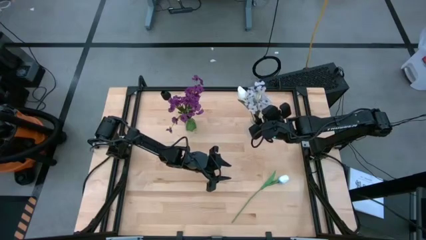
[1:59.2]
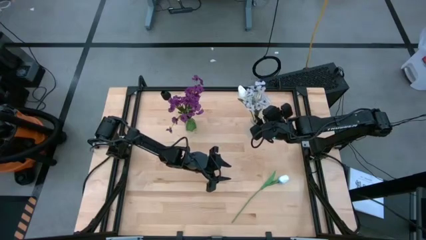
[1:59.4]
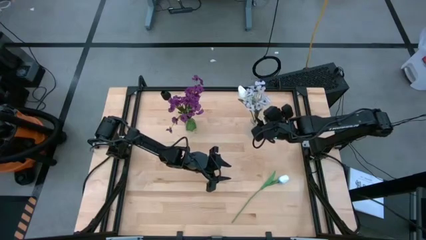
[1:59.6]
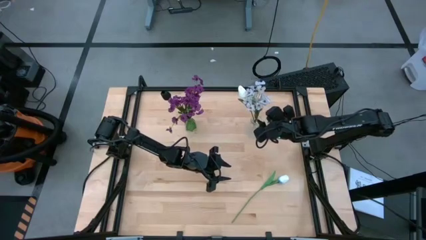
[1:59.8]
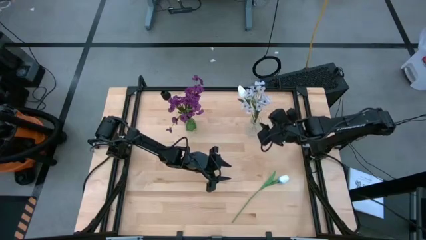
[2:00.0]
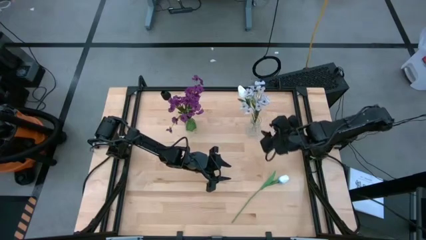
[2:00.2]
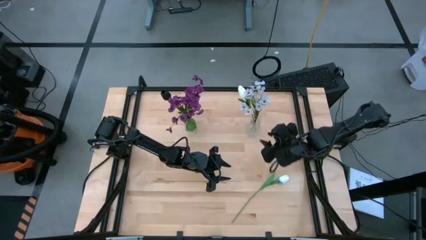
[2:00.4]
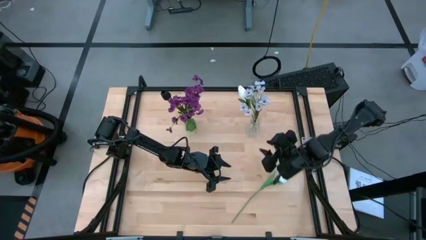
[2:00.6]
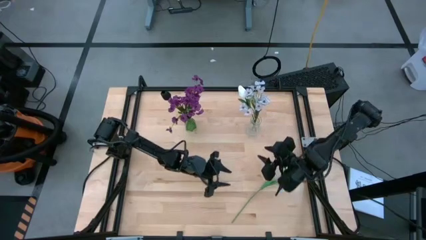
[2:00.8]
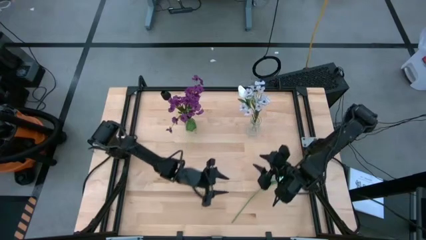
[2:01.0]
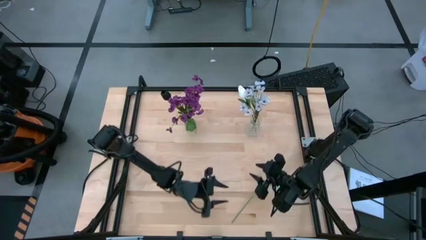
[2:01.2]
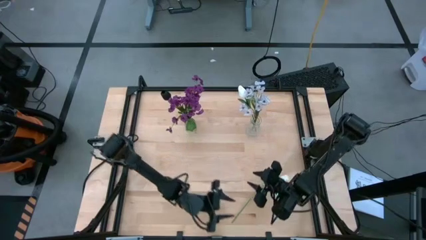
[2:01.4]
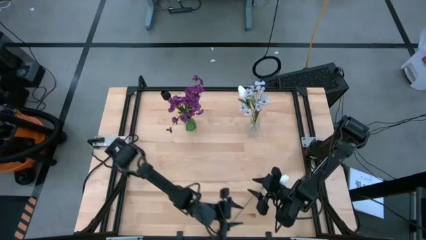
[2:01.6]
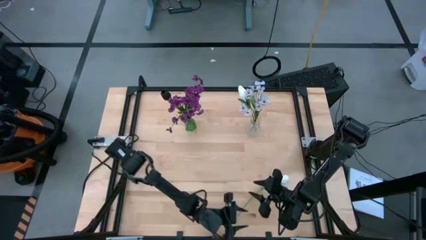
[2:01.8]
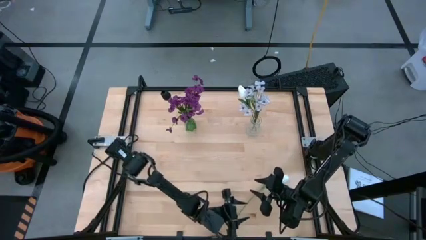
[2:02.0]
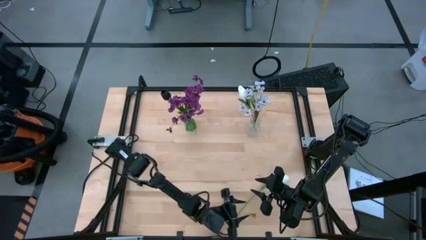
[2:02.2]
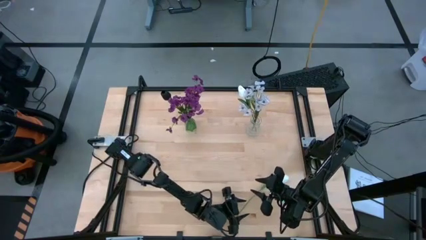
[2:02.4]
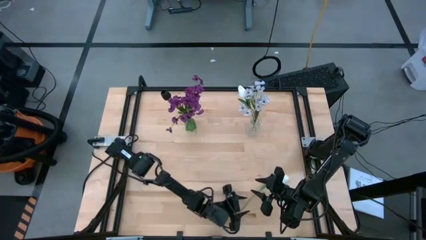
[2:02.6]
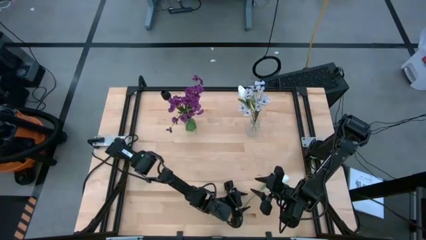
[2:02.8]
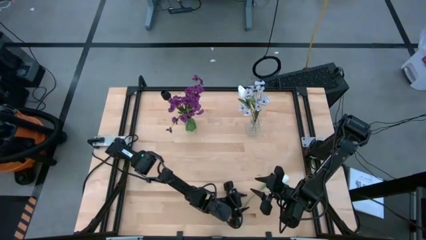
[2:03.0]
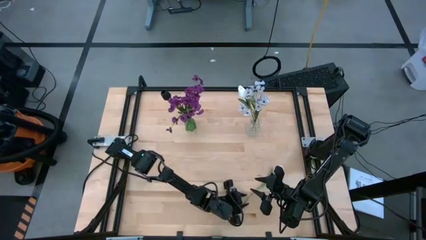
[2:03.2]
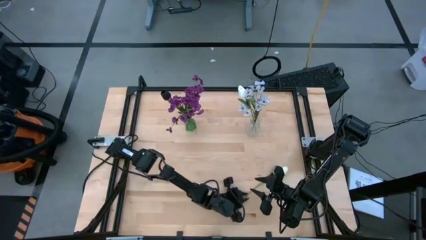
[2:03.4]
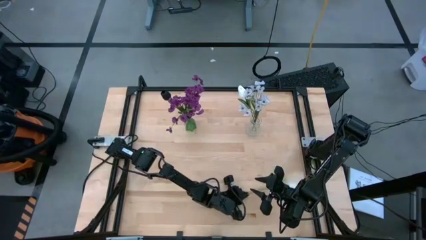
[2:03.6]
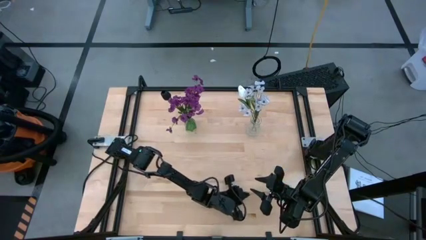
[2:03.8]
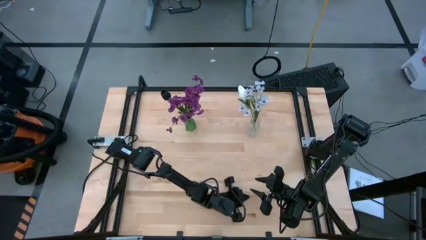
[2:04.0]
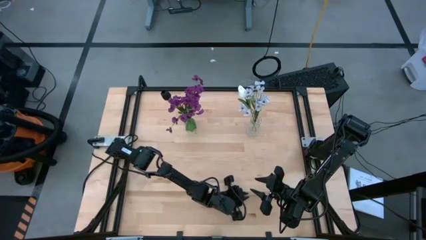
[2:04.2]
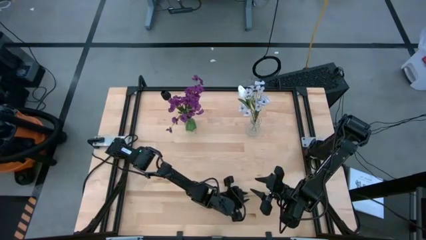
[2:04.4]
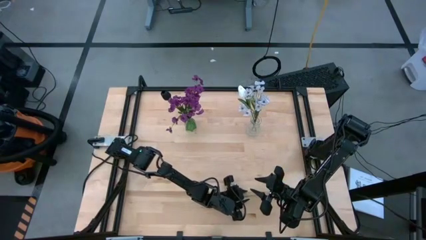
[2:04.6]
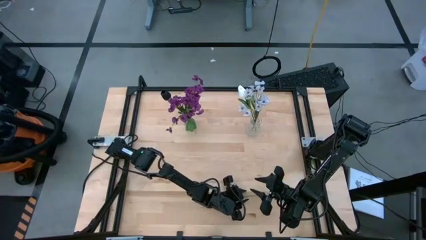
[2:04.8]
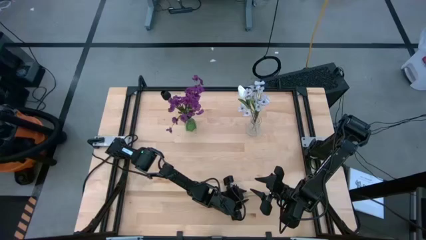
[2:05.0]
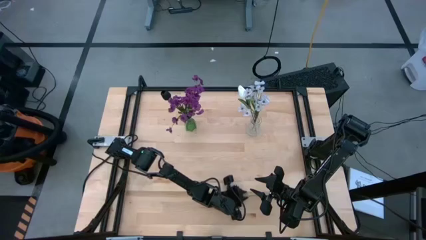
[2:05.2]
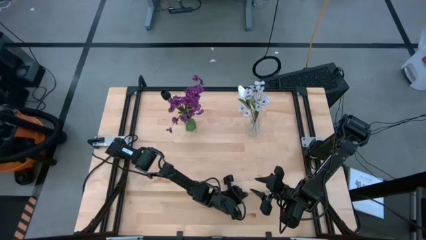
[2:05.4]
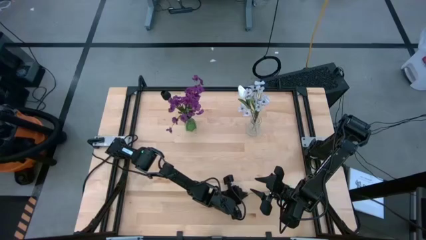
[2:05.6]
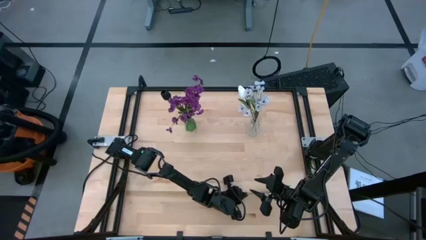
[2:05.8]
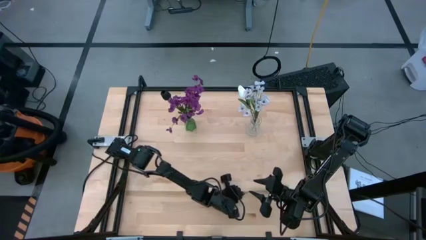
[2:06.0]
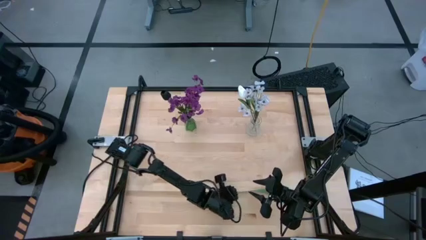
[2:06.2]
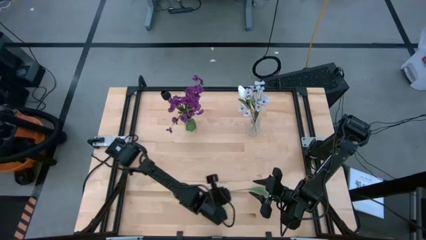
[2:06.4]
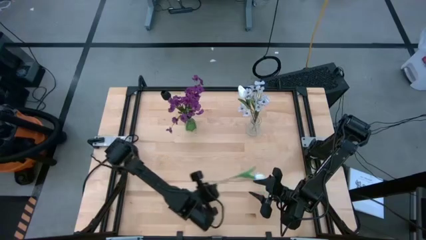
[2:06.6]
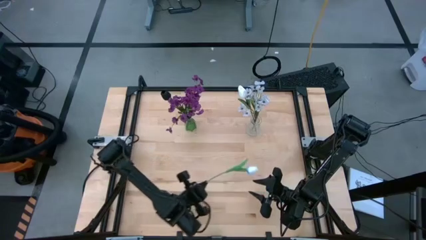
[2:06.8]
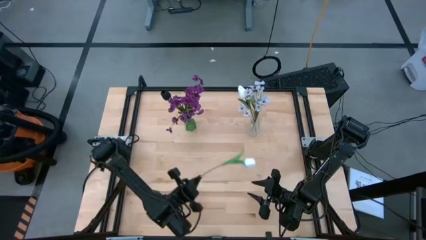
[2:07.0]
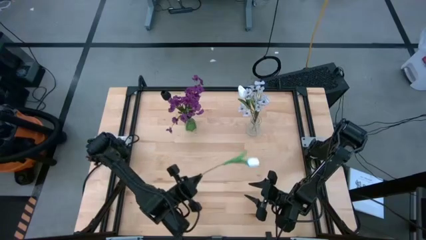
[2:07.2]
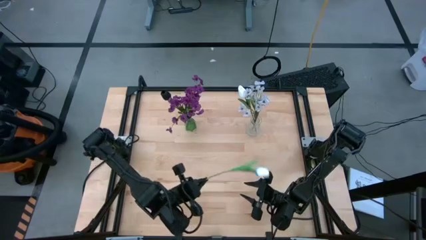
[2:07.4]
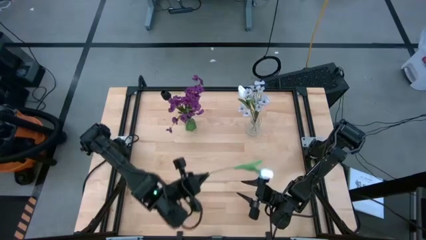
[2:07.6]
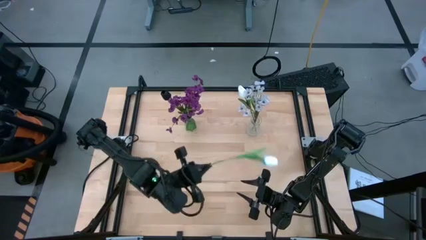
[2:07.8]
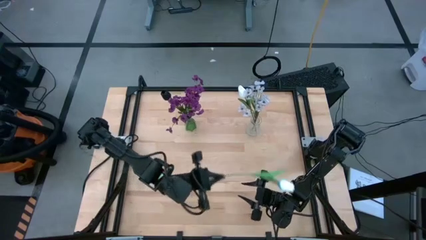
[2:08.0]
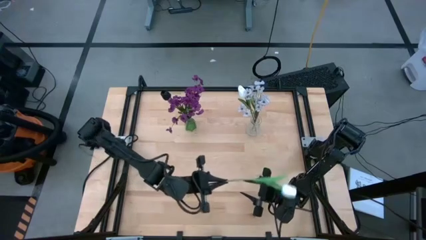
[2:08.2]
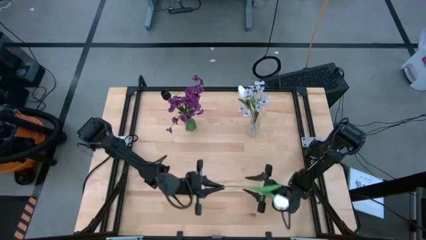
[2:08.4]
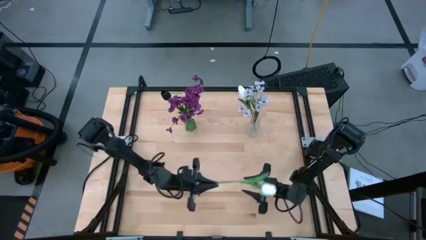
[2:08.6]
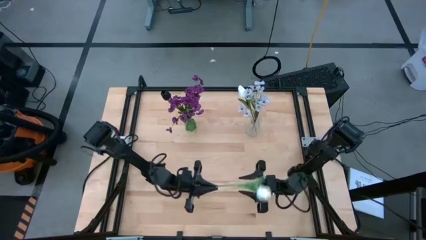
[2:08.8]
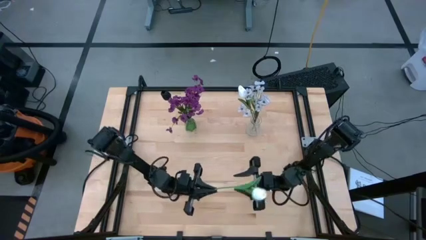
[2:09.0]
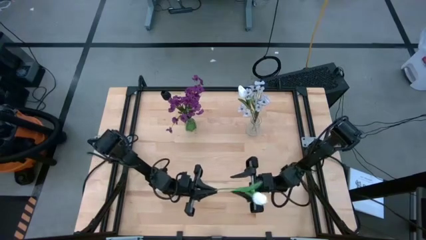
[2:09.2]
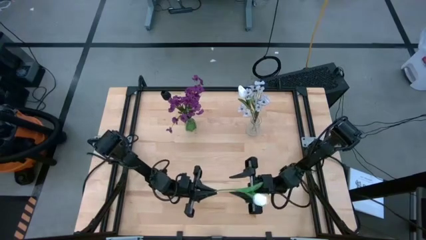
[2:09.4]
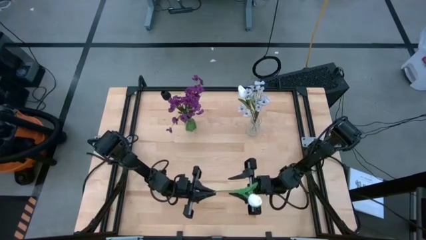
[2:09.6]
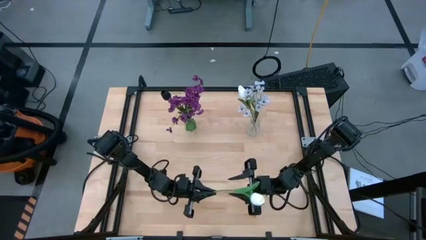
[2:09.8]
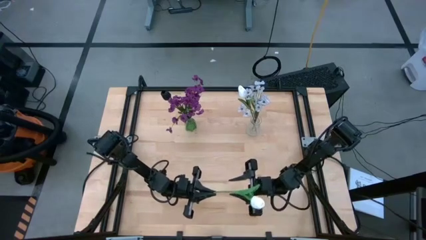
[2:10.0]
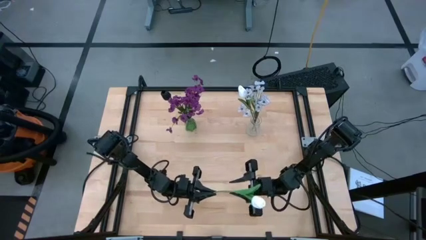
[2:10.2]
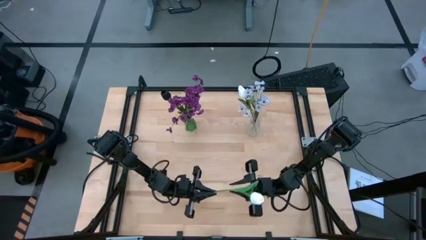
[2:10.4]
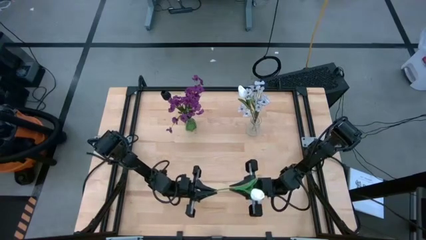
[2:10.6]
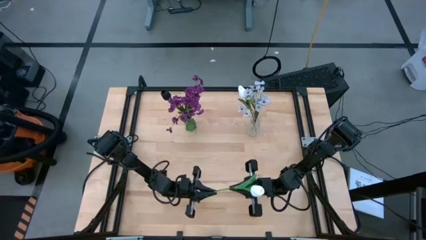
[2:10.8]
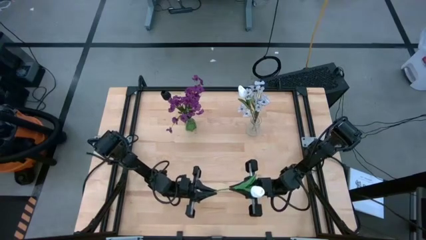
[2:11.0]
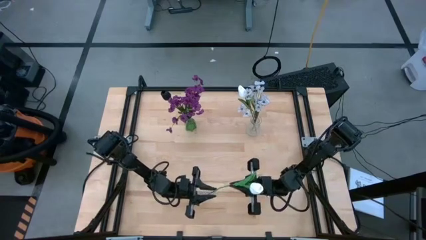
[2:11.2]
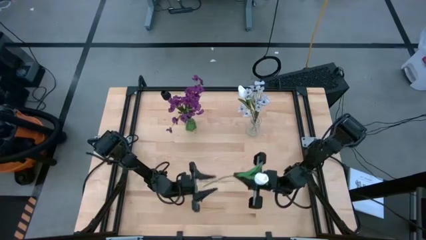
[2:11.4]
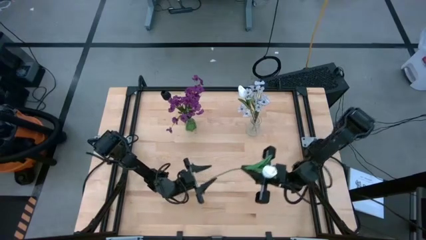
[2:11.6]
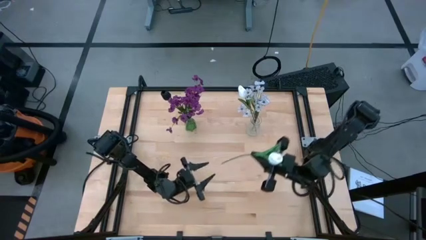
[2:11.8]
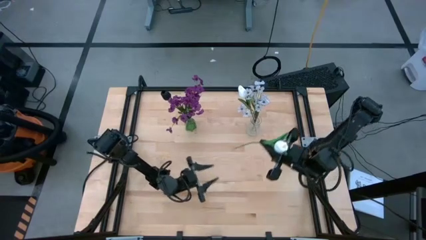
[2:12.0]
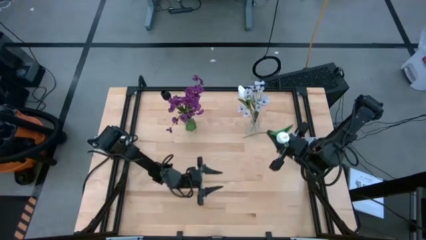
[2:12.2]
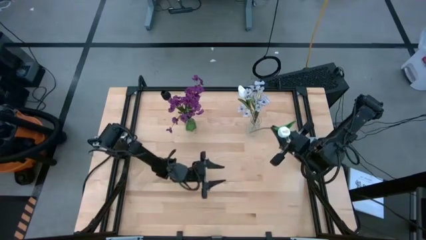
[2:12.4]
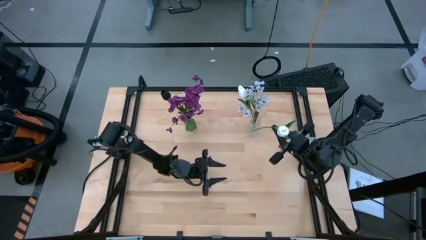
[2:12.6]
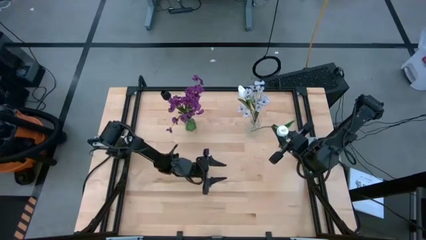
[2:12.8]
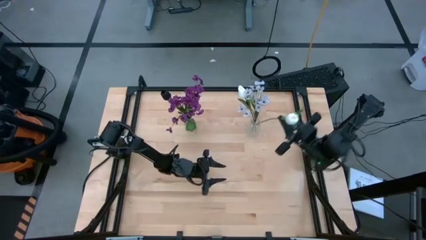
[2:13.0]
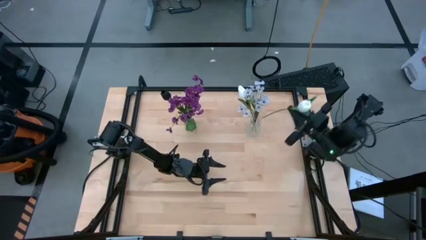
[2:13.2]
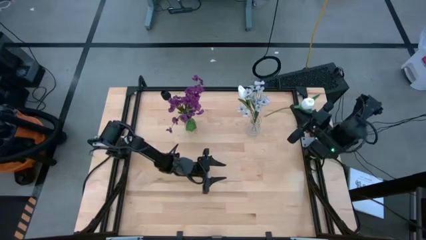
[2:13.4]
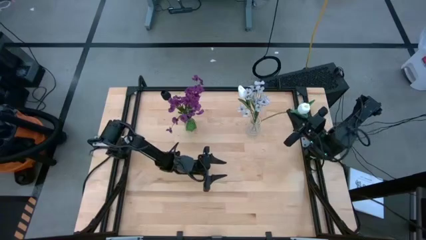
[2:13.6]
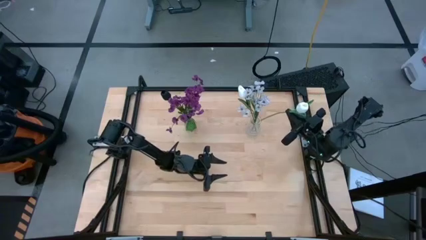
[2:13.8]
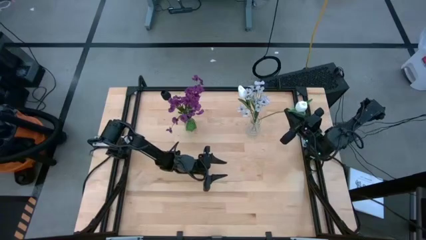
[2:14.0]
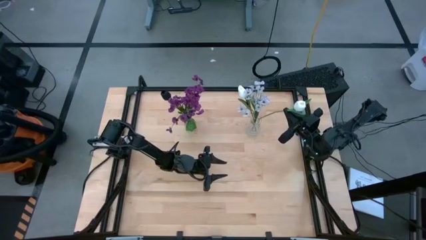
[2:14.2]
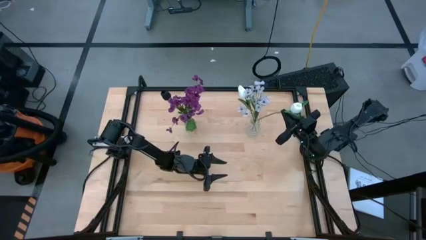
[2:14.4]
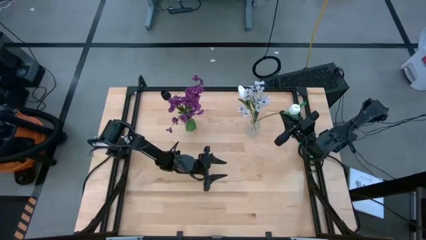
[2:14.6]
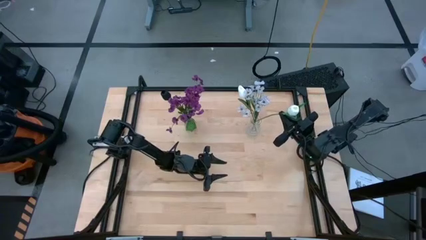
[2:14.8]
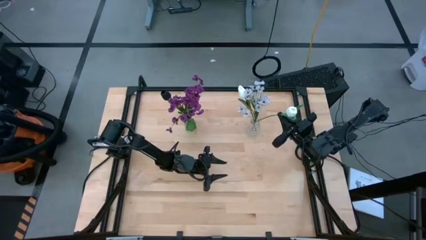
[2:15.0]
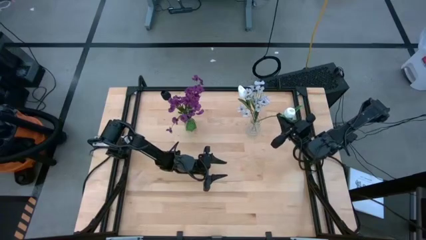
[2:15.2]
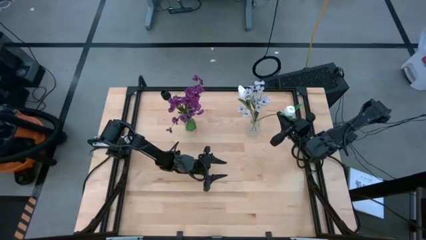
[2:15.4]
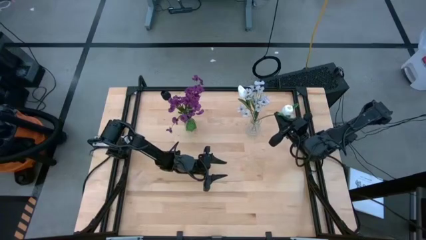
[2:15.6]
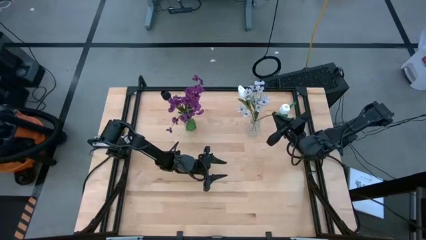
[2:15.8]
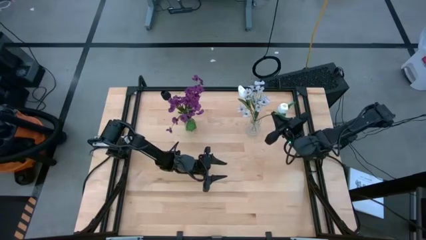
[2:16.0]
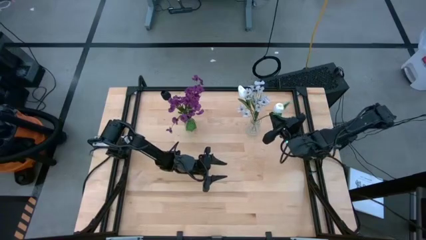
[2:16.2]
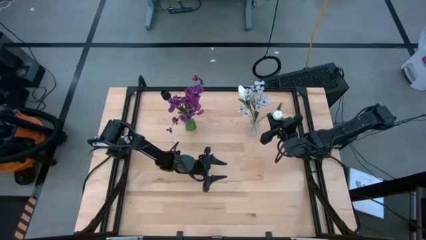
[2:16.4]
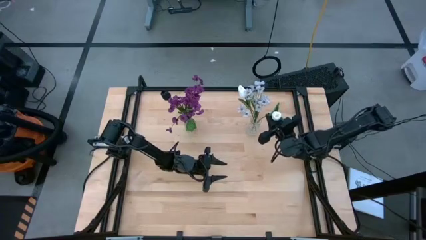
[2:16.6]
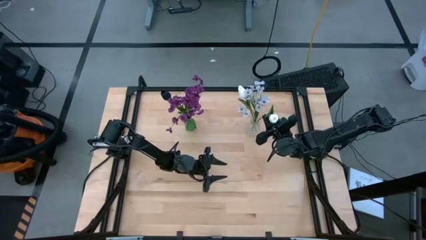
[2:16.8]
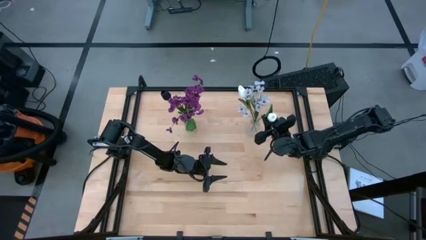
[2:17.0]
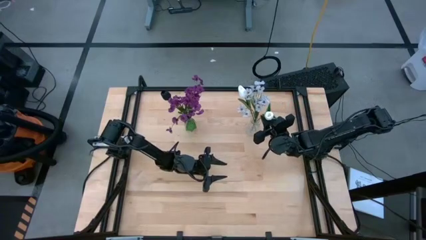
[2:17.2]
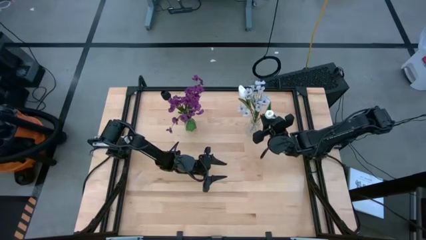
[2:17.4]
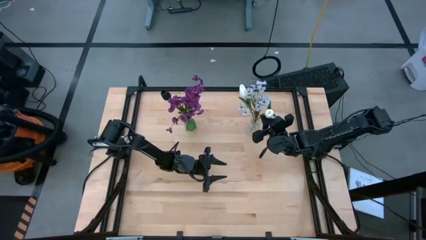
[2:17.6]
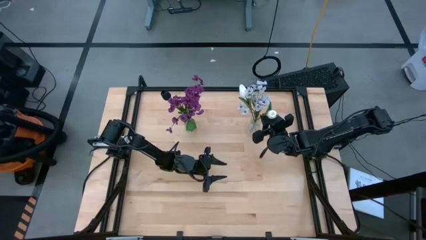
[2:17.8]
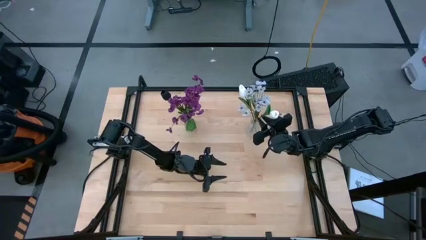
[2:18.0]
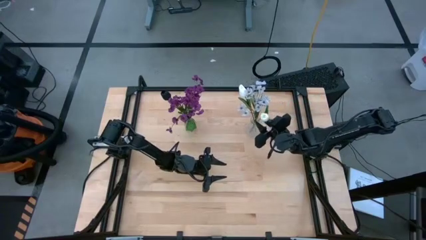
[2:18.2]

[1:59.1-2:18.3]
Task: Sort flowers into vase by color
Put the white flower into the transparent vase
